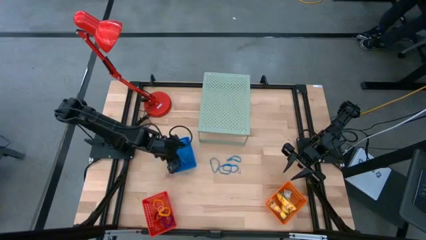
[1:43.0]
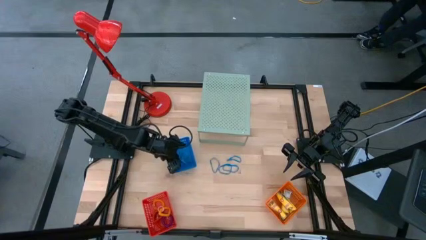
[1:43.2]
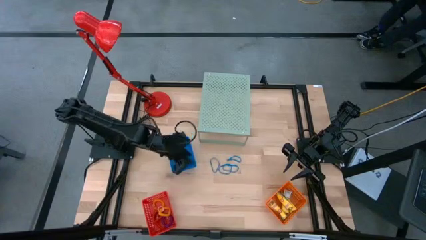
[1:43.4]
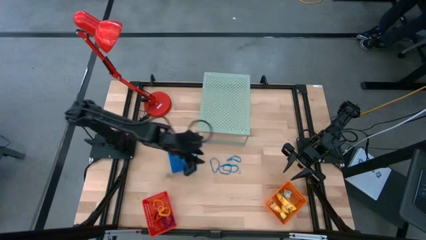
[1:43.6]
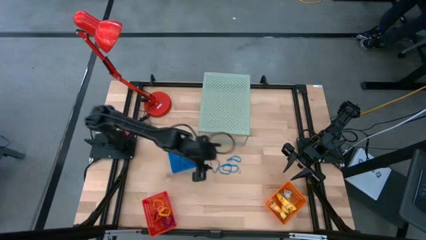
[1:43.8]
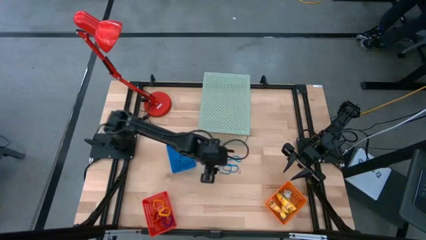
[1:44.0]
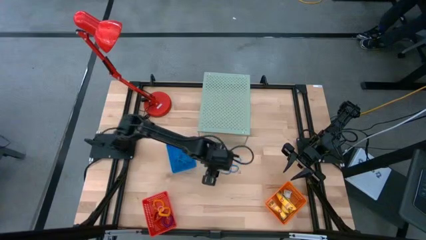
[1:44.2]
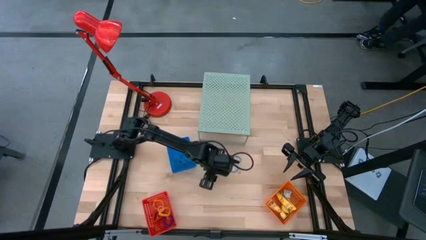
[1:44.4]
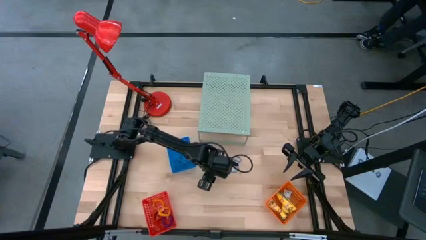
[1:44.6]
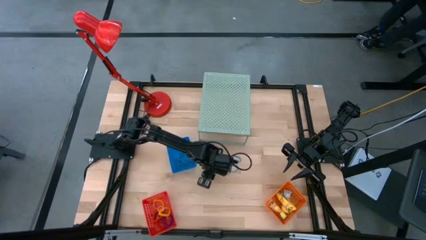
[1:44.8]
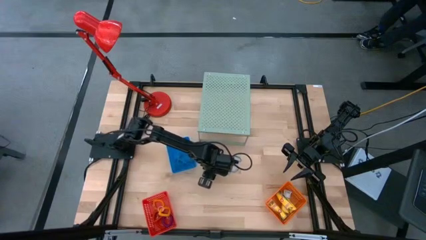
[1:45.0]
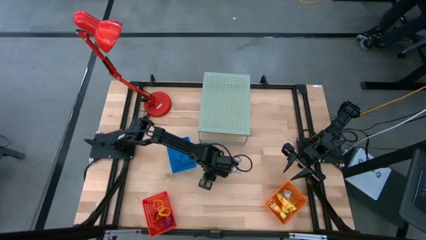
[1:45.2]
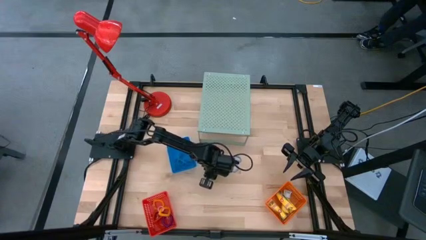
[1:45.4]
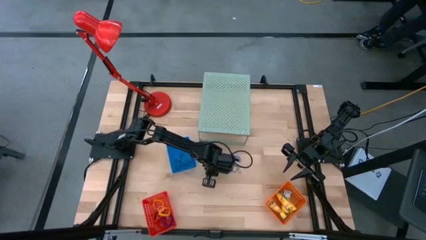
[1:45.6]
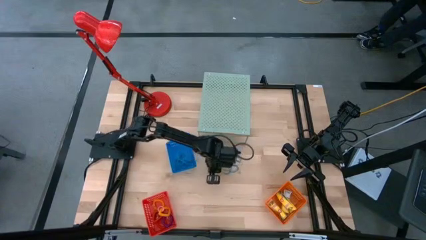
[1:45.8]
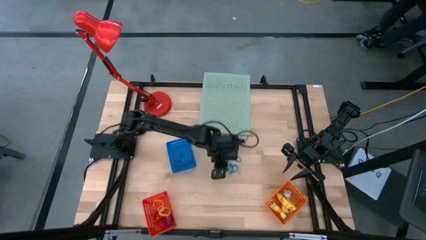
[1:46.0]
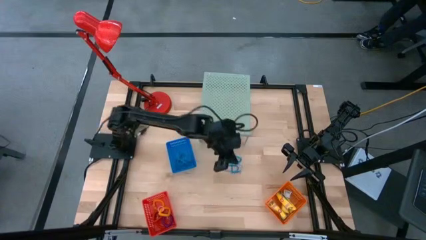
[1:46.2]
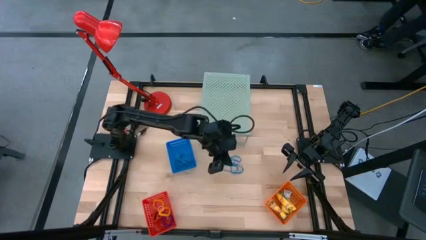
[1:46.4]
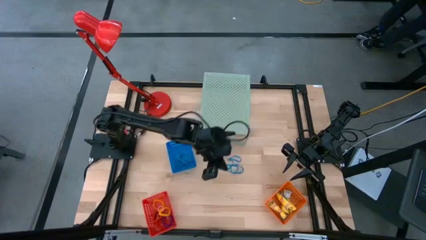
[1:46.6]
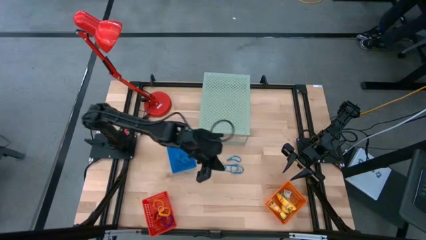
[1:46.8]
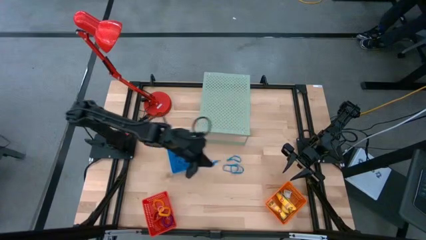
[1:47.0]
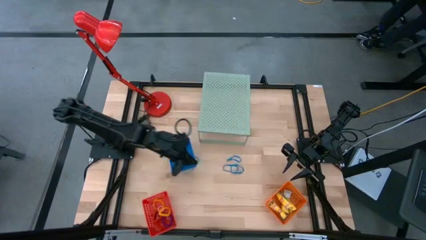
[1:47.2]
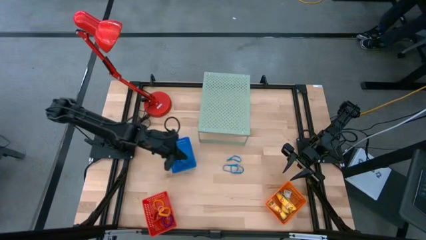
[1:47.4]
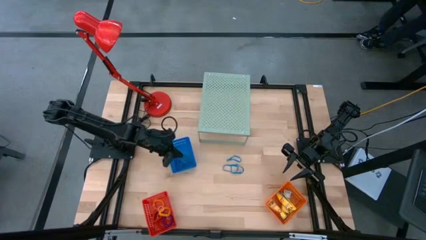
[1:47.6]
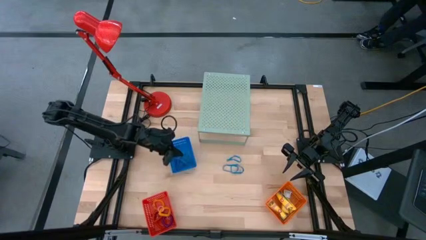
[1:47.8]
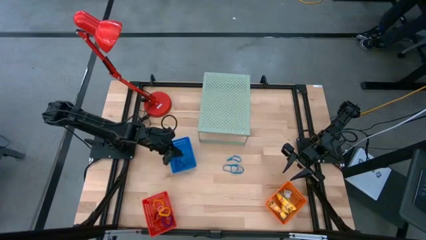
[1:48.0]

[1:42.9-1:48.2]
Task: Pick & Place Office Desk Supplies
Put the blue rubber band into the blue basket

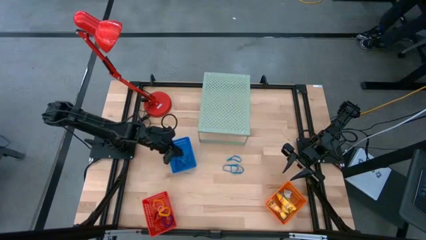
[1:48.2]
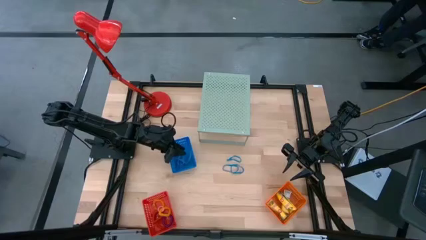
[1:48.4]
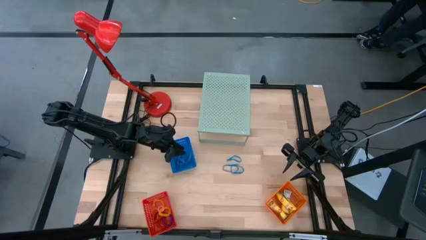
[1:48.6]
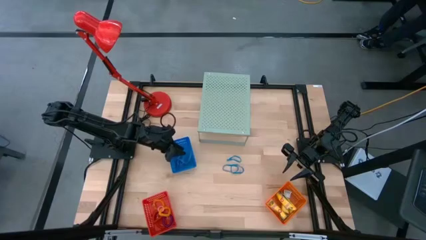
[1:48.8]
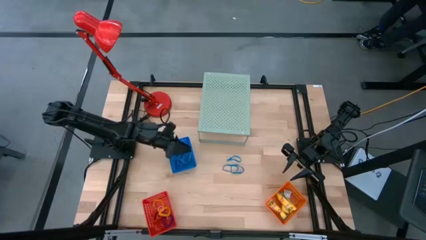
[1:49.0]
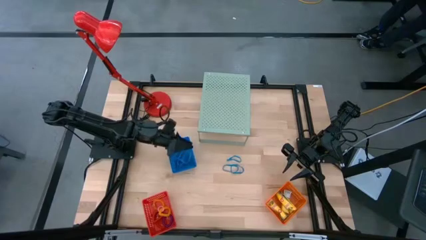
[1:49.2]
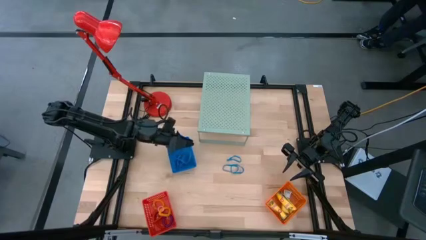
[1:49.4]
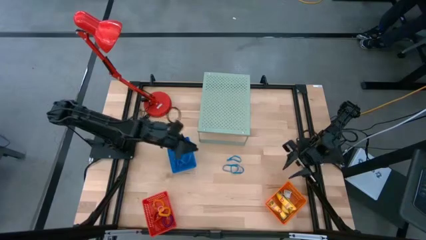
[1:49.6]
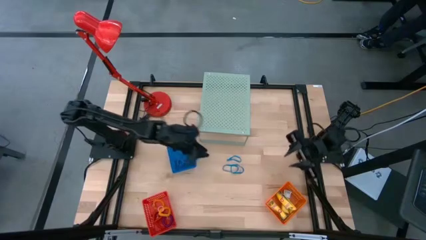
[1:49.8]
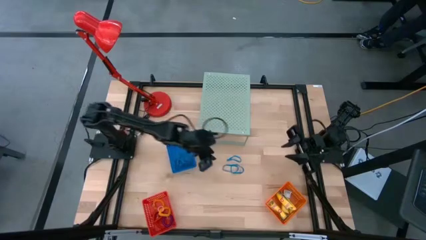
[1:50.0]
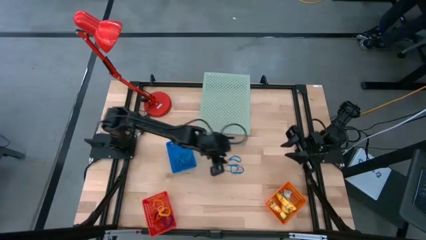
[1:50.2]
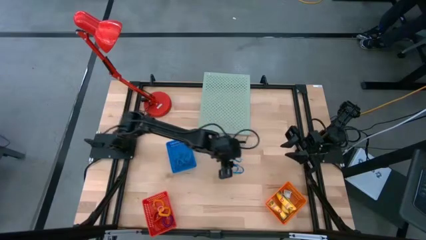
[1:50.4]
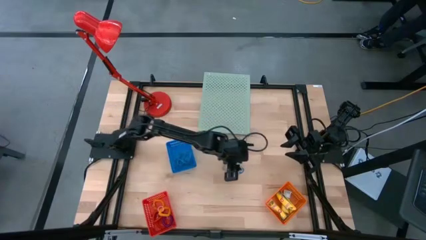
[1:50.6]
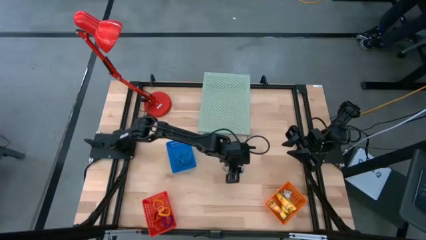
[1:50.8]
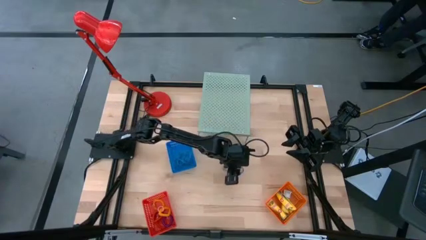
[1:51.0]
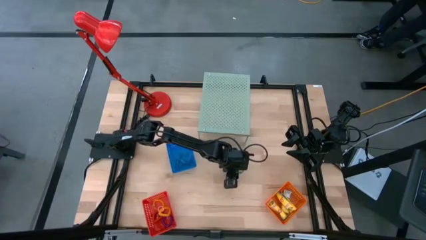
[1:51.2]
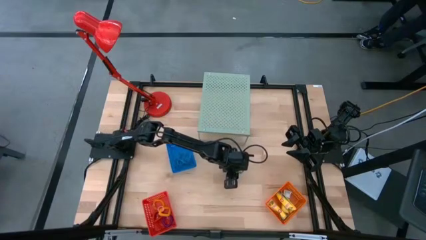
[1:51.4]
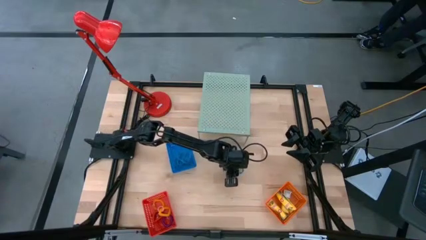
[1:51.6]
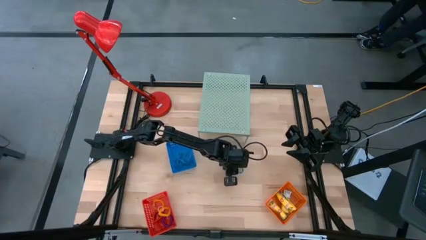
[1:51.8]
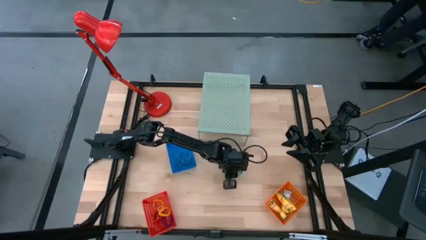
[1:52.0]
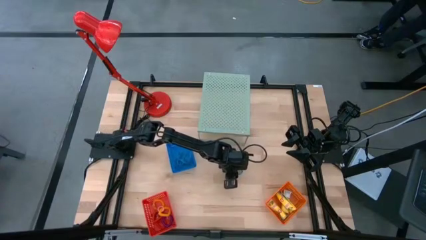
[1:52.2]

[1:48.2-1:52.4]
Put the blue rubber band into the blue basket

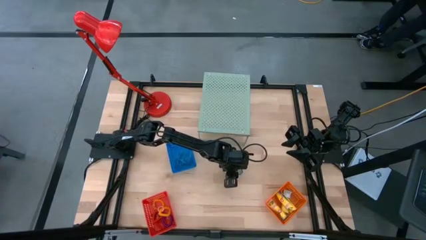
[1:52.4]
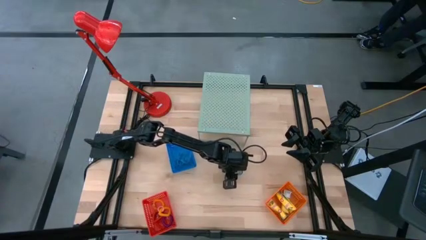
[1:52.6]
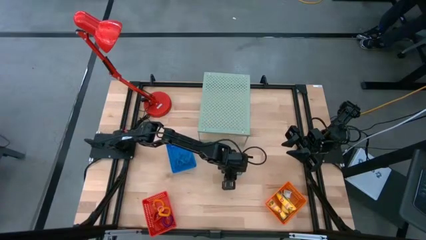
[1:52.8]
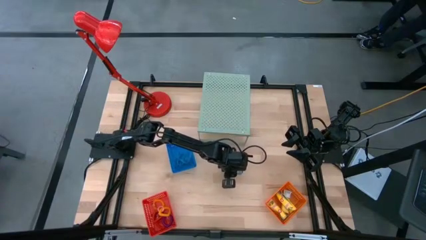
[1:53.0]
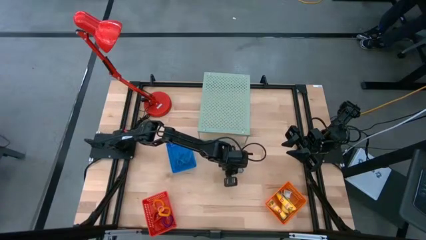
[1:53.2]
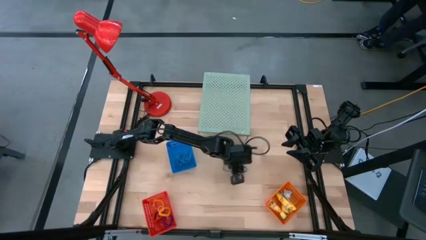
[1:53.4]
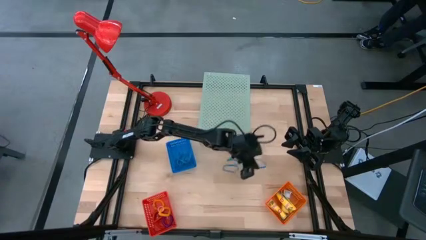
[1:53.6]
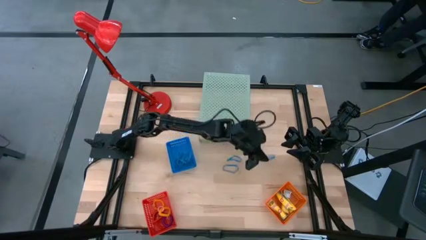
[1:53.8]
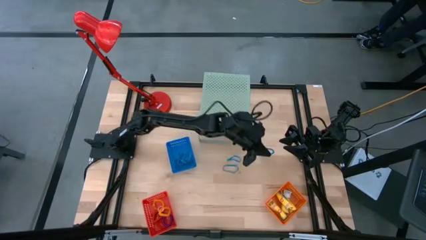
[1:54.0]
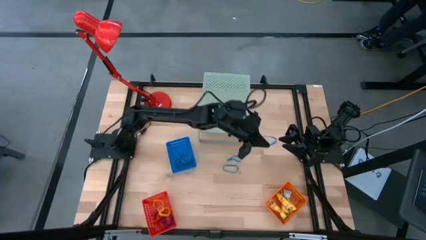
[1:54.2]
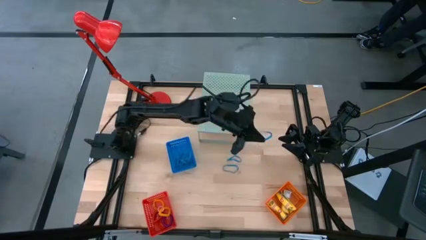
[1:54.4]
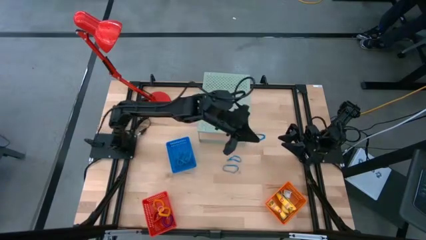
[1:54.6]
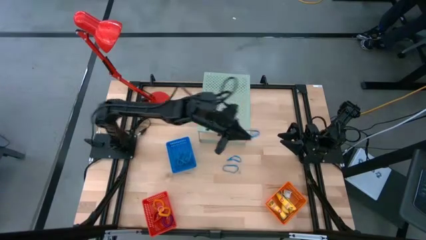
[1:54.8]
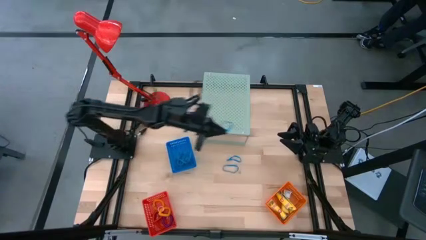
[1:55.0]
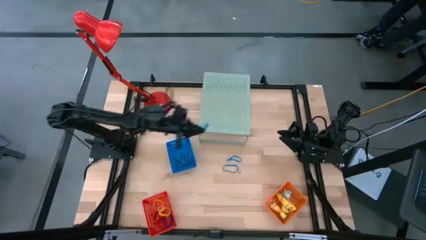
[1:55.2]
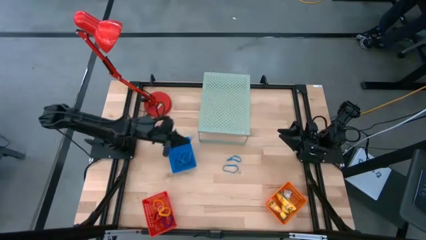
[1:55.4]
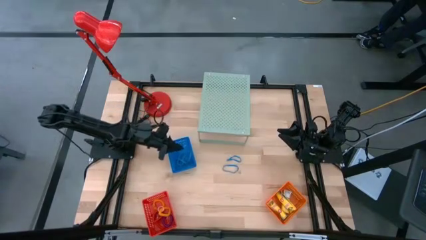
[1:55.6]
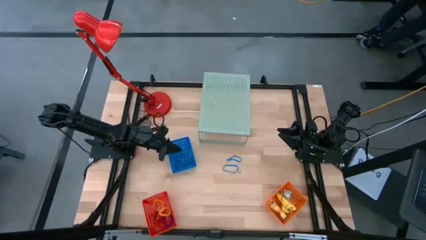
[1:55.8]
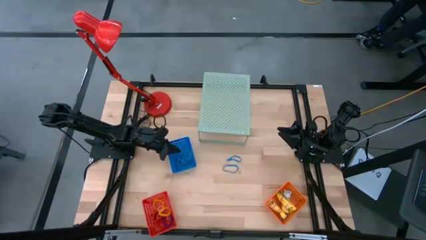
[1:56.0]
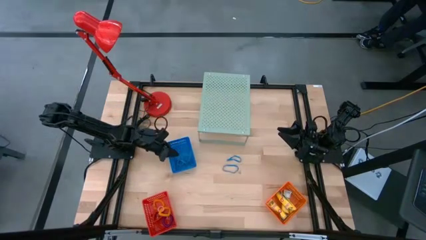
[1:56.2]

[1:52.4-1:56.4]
Put the blue rubber band into the blue basket

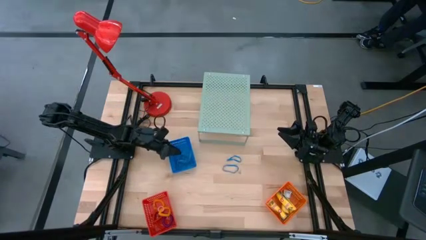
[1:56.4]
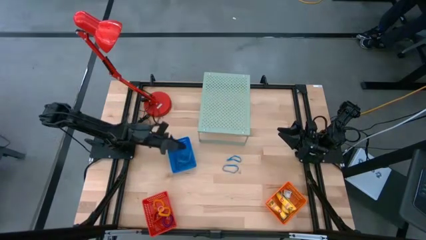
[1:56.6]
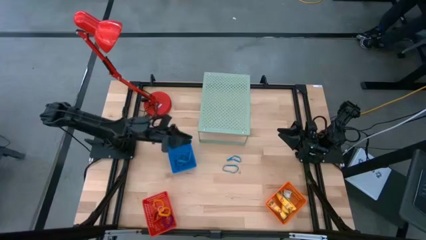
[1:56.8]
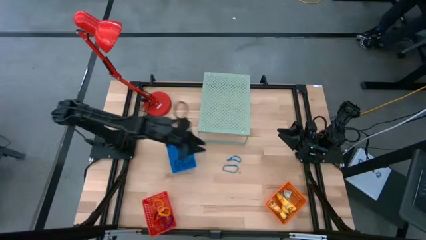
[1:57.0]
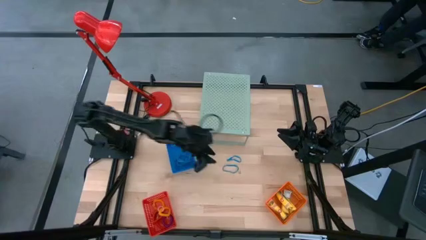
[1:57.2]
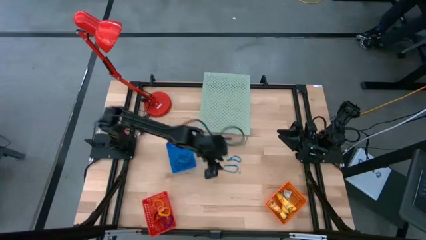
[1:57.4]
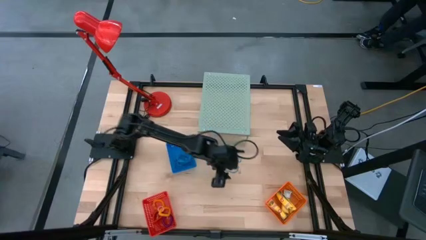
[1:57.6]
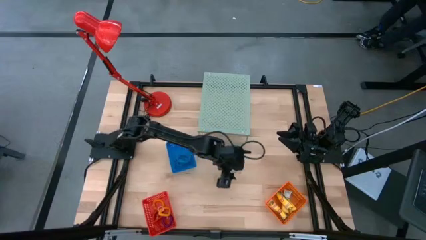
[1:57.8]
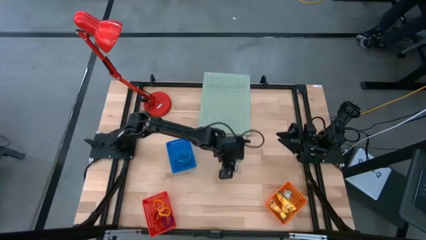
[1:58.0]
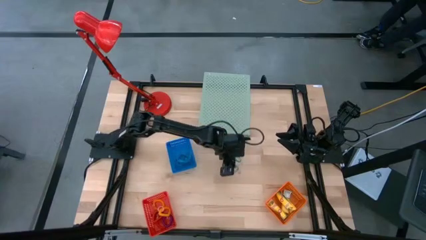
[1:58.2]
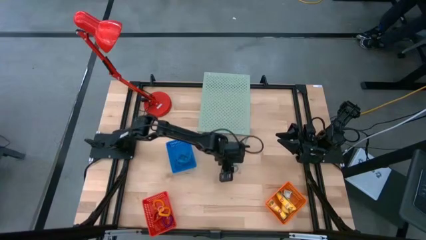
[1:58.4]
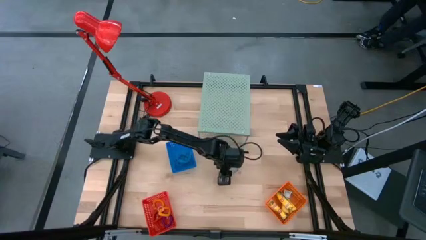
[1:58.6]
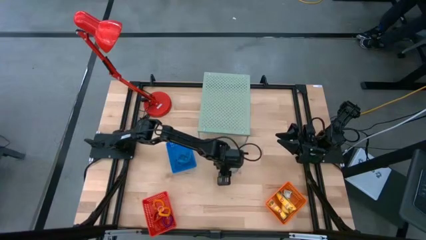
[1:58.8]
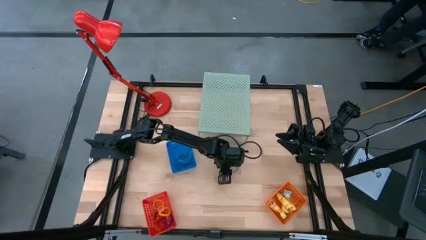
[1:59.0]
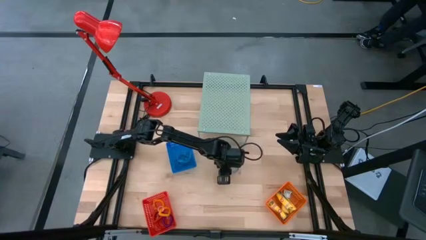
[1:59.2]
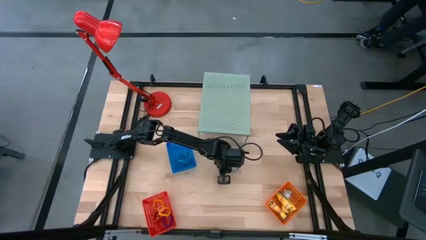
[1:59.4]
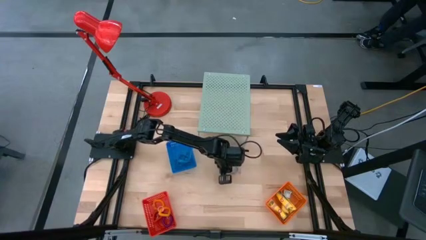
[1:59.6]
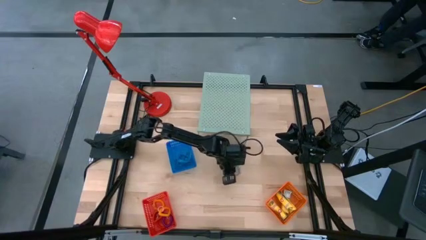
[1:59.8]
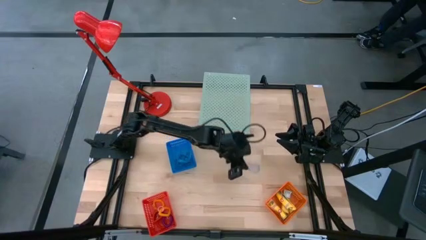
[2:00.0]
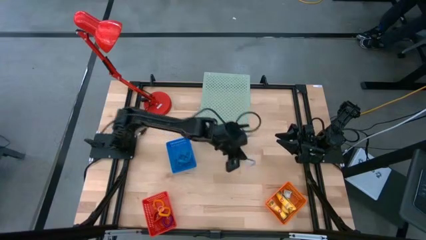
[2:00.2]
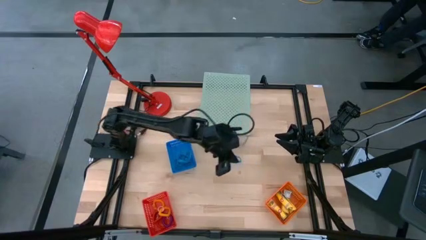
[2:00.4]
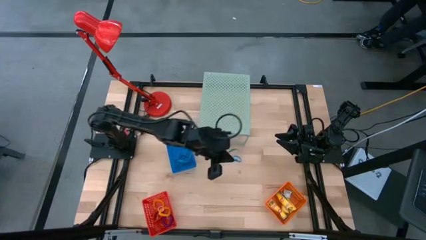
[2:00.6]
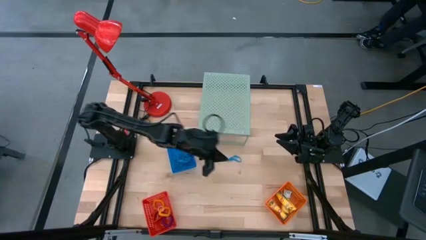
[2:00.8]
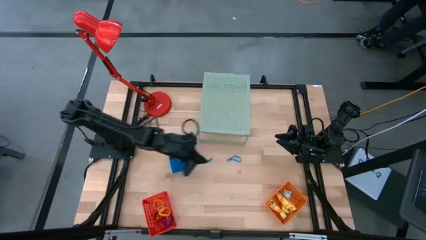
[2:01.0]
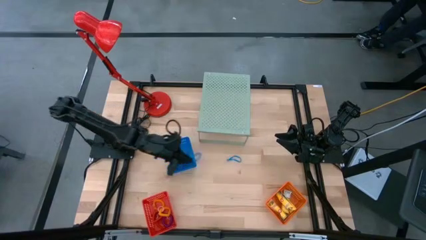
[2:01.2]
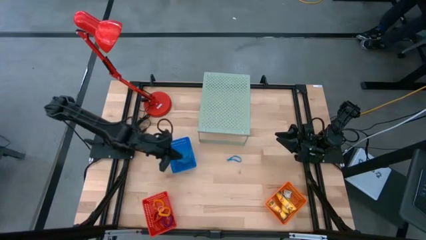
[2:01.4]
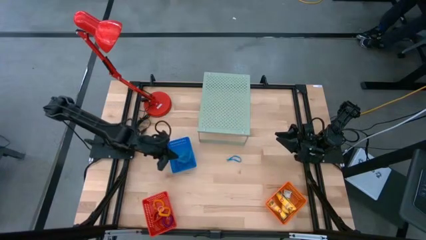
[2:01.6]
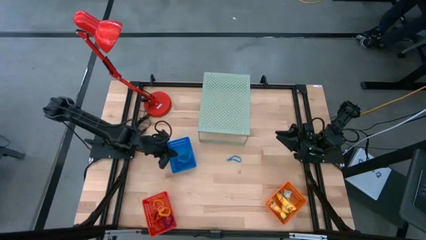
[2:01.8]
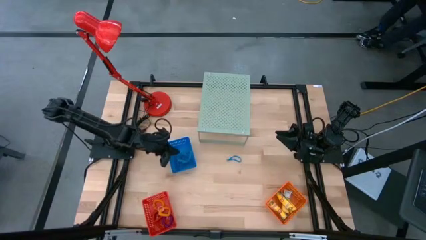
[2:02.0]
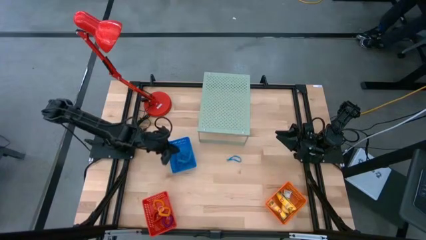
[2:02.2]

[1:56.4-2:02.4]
Put the blue rubber band into the blue basket
